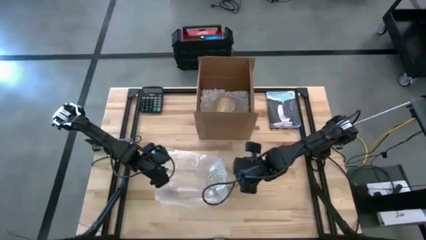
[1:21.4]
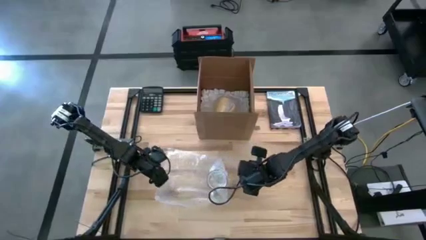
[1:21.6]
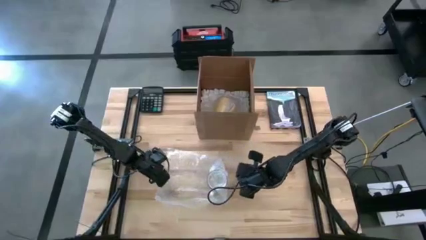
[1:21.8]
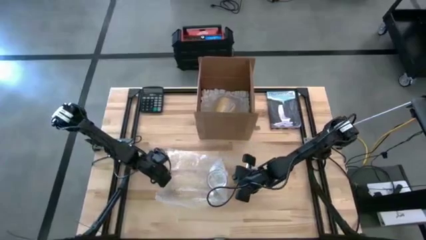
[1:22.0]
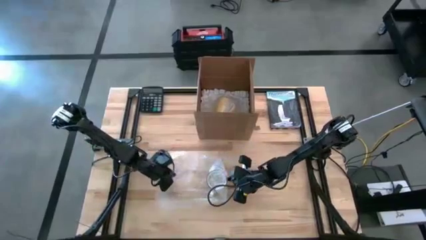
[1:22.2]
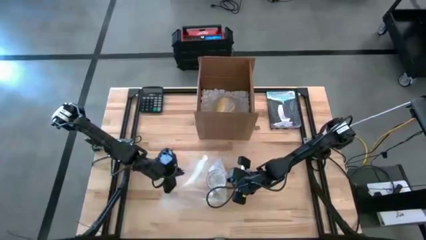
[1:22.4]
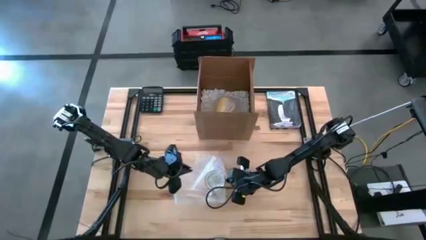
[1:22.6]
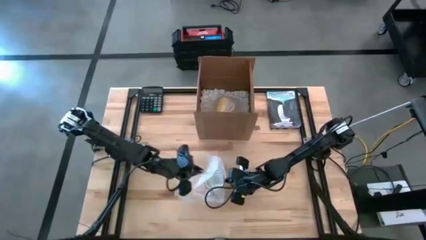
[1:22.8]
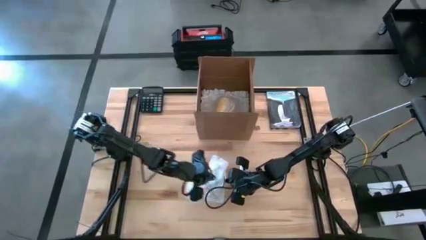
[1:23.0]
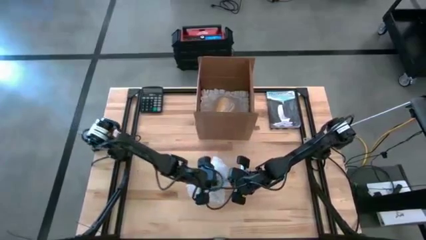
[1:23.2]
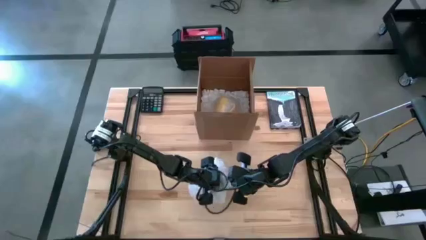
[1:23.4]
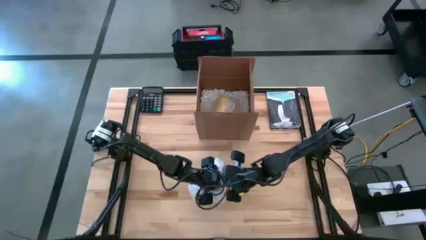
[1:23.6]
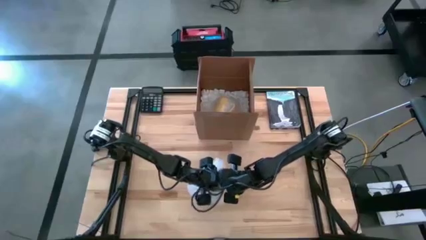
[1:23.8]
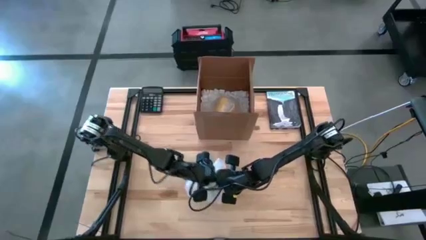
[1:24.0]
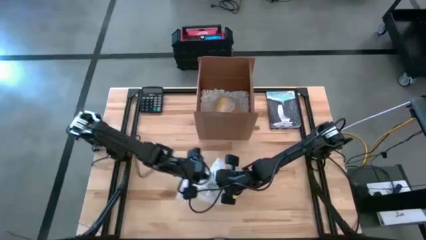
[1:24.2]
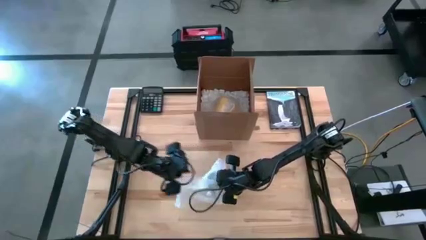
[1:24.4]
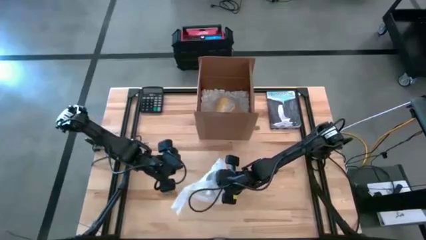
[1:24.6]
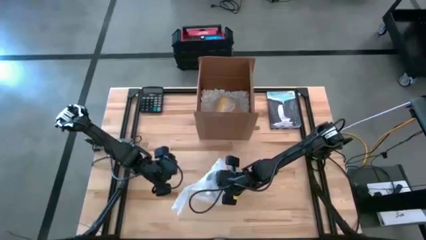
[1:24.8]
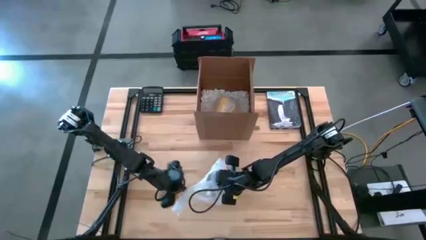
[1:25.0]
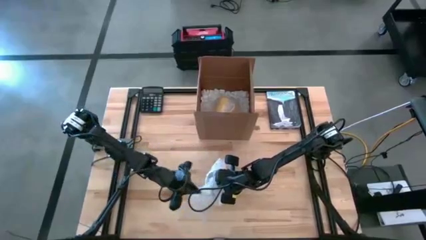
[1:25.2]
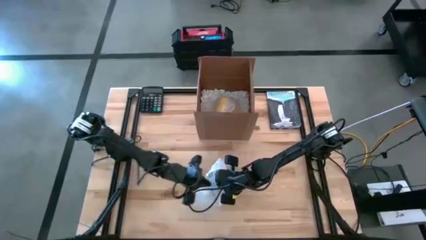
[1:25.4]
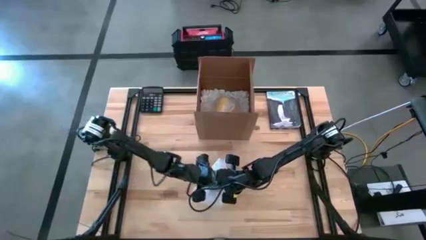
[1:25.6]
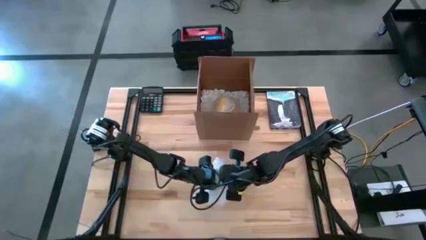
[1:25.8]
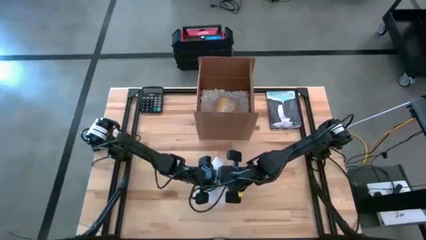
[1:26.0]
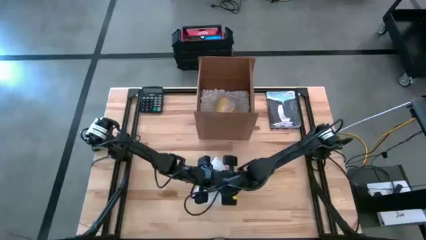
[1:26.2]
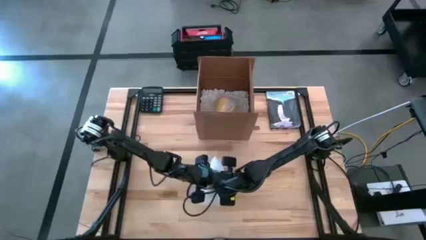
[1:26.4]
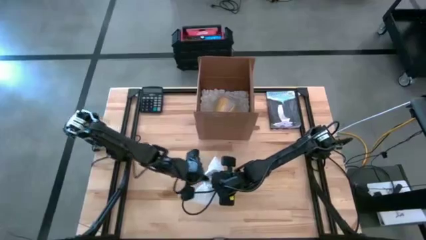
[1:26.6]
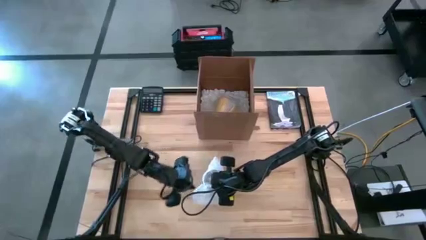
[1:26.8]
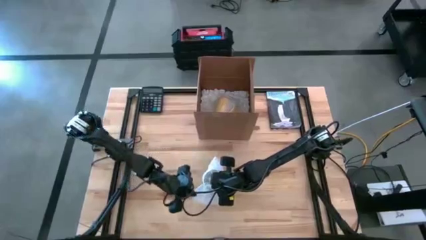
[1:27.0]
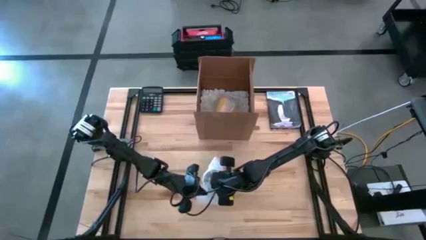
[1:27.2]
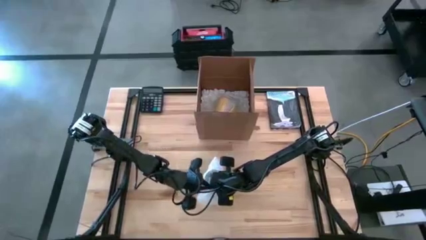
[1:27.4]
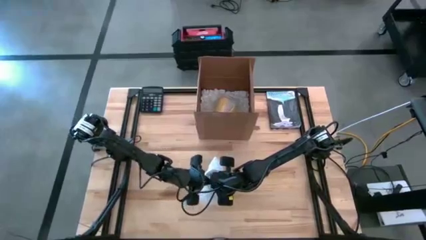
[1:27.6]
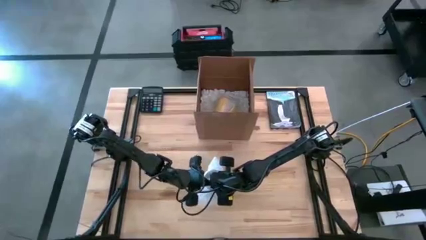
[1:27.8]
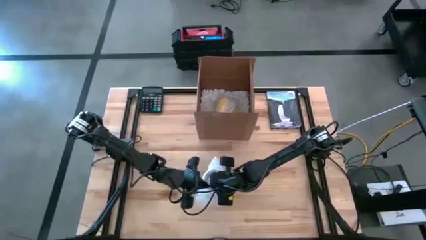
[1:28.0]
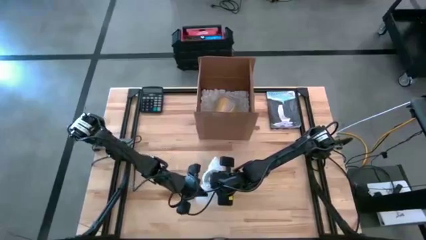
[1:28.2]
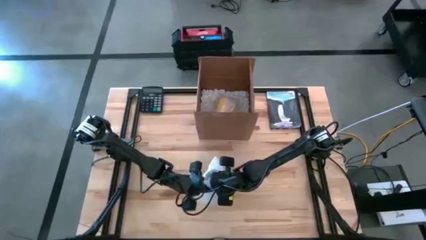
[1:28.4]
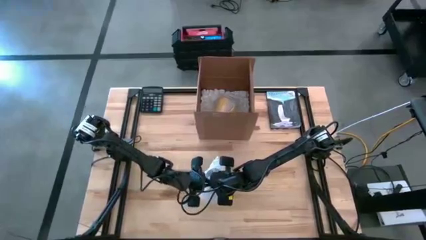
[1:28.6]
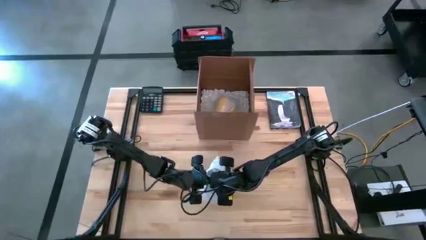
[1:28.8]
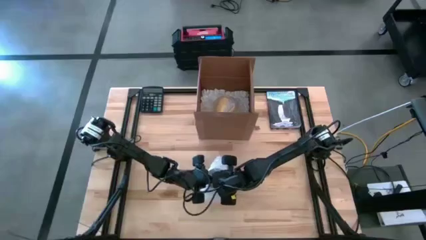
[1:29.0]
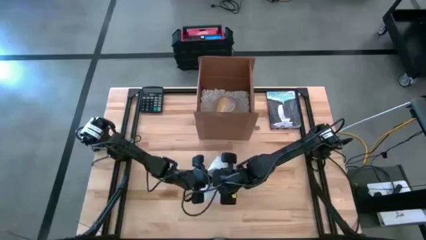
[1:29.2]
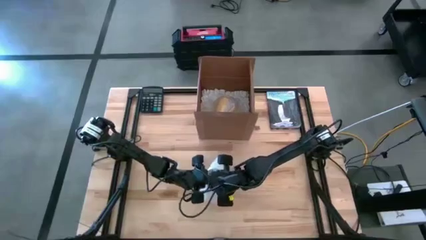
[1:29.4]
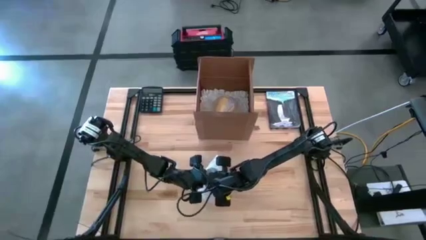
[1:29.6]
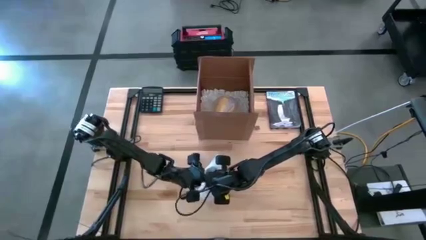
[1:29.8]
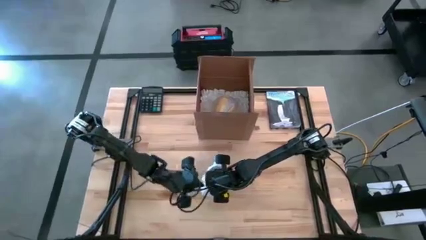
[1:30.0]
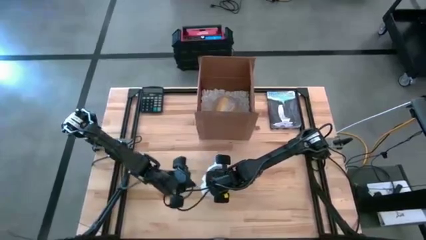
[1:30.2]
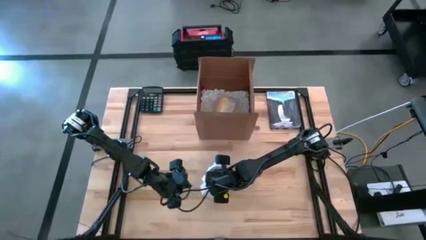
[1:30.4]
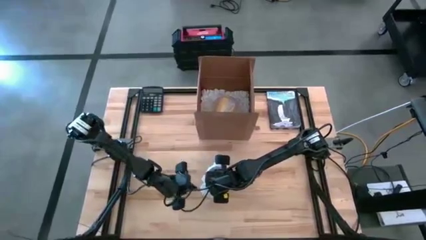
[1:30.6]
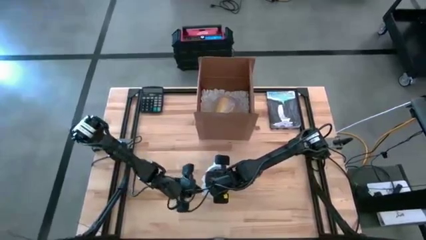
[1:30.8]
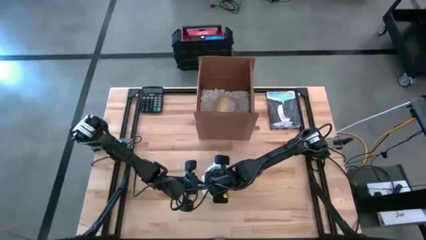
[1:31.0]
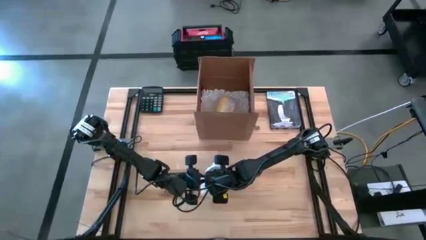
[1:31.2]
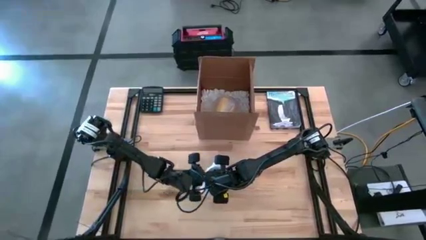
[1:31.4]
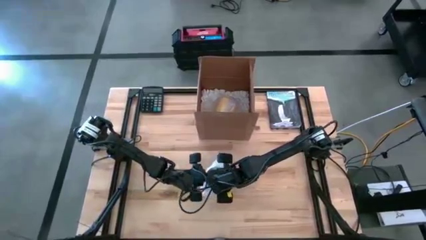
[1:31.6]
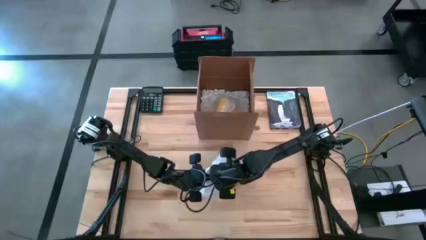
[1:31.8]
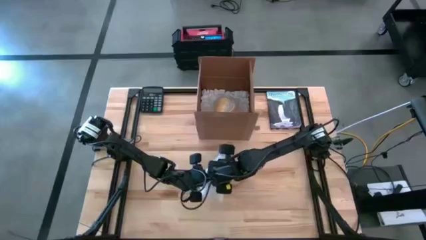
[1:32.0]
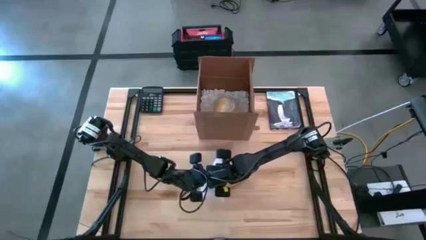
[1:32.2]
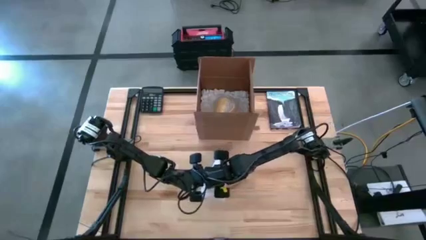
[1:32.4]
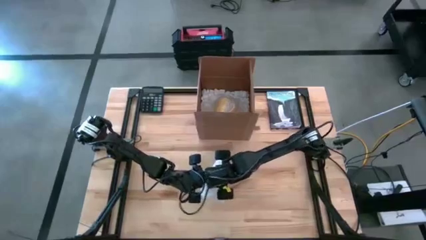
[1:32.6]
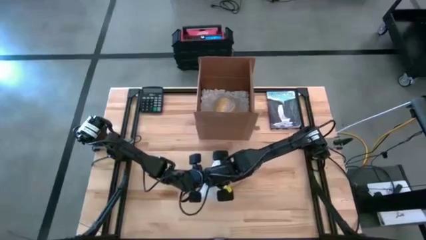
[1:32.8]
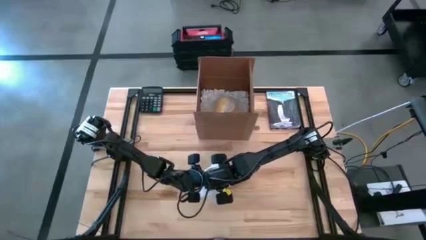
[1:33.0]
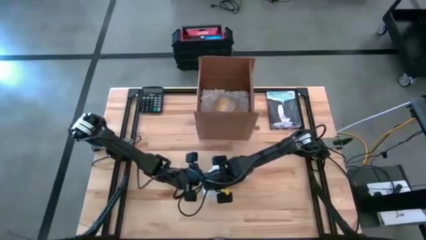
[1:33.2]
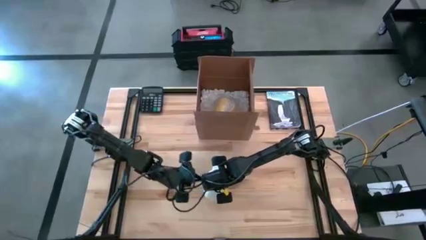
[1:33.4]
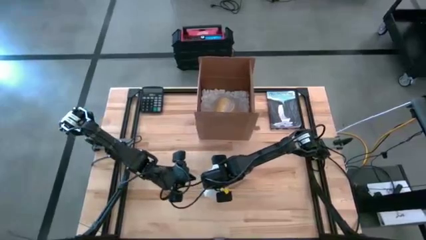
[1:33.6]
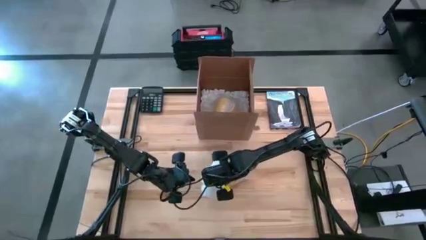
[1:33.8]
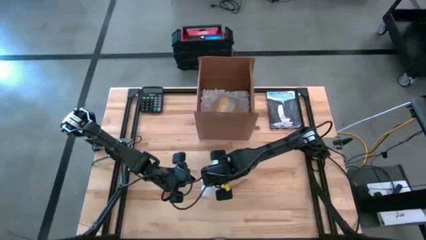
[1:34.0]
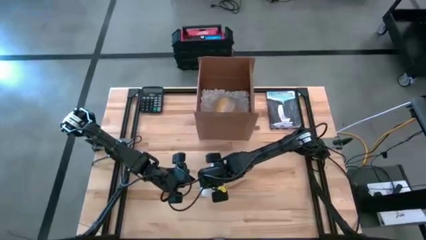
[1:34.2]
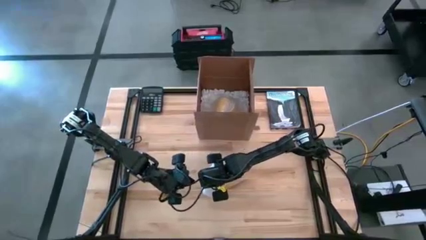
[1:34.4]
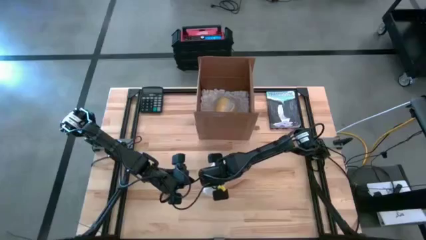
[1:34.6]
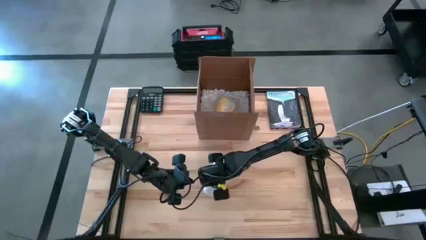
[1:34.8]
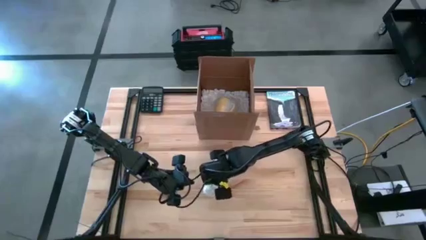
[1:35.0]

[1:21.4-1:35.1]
Task: wrap mug
Wrap the blue mug in bubble wrap

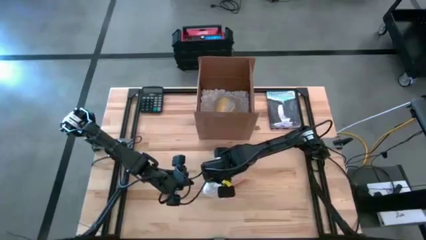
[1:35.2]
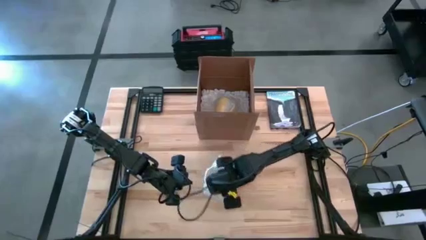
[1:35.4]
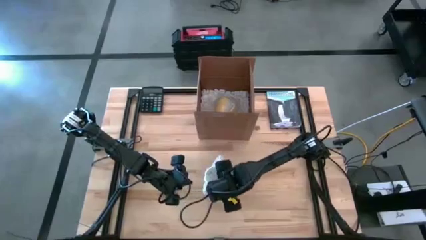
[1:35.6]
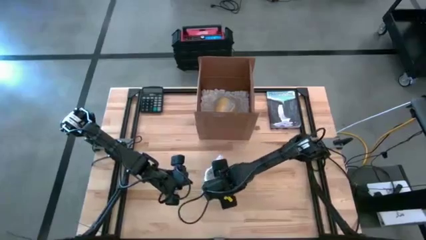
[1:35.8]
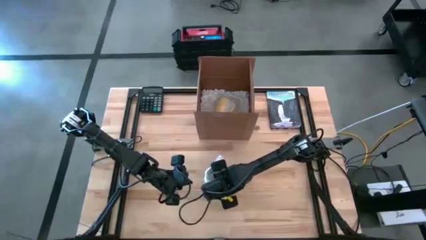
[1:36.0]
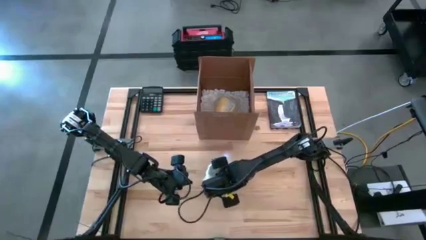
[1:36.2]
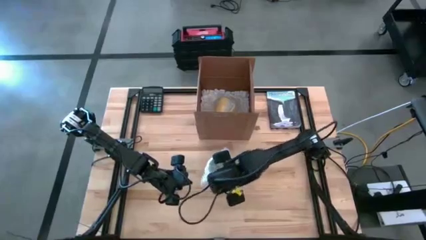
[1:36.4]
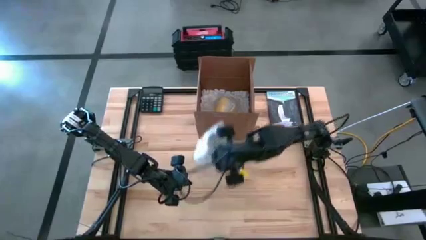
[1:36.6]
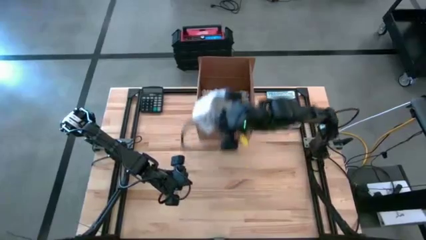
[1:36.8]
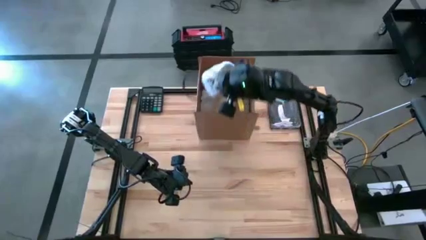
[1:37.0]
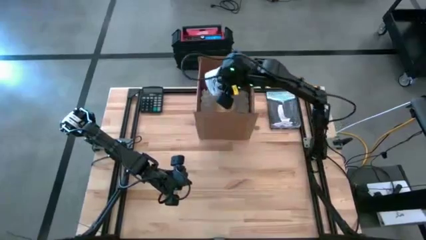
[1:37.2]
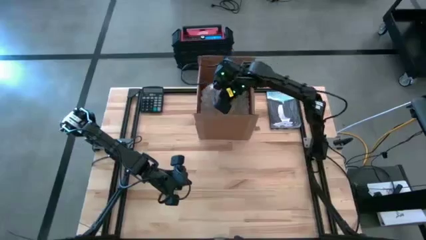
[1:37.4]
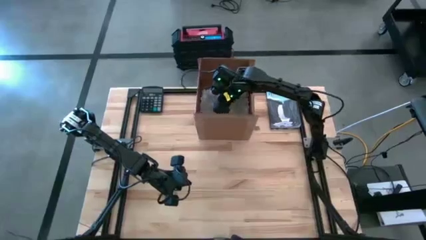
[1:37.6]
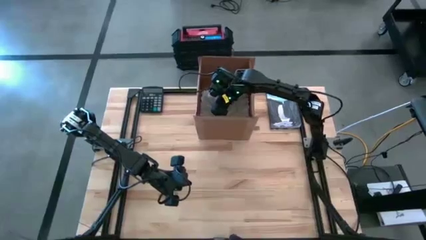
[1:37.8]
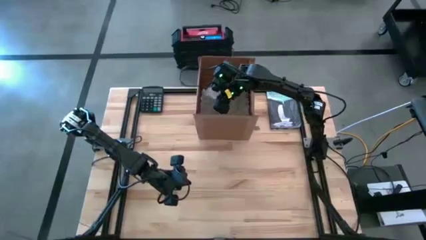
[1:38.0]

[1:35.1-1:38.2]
Put the blue wrapped mug into the brown cardboard box
